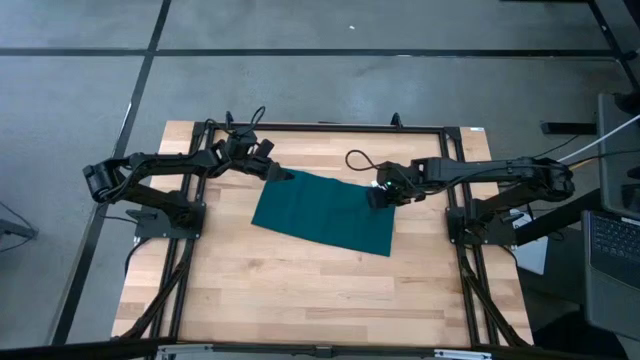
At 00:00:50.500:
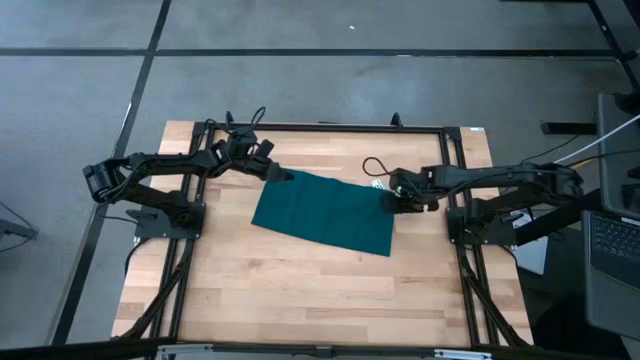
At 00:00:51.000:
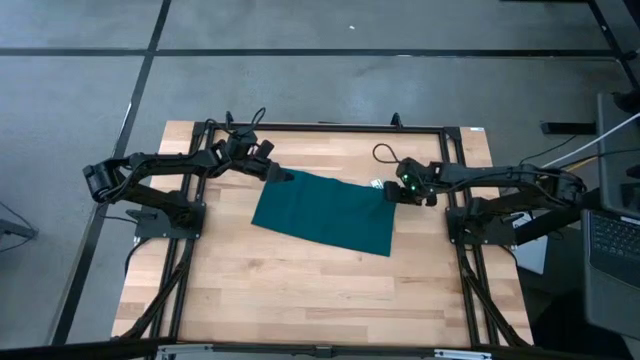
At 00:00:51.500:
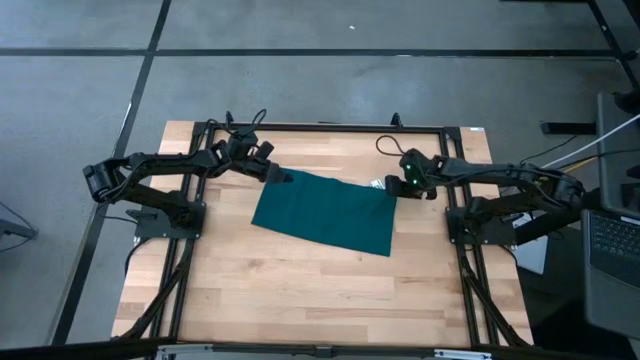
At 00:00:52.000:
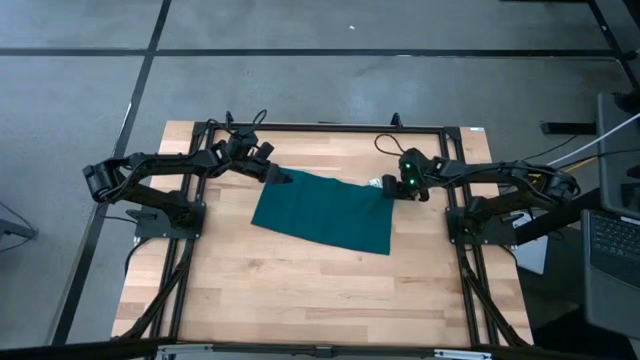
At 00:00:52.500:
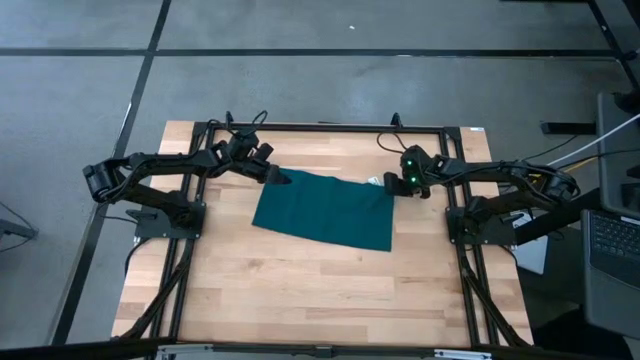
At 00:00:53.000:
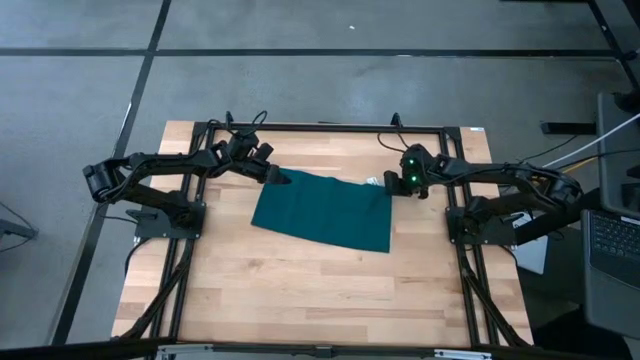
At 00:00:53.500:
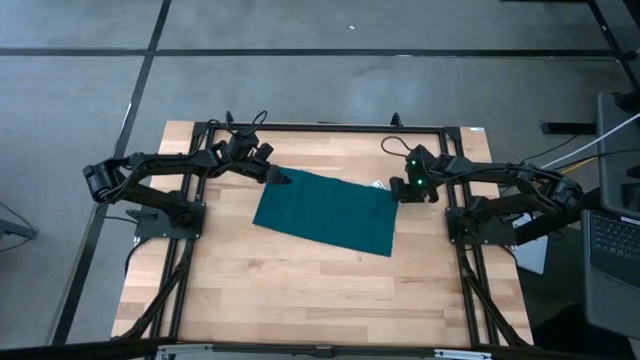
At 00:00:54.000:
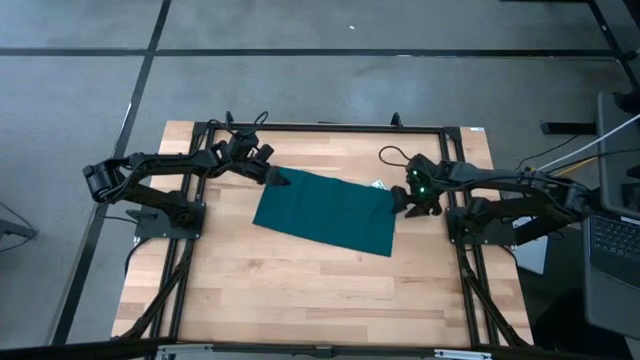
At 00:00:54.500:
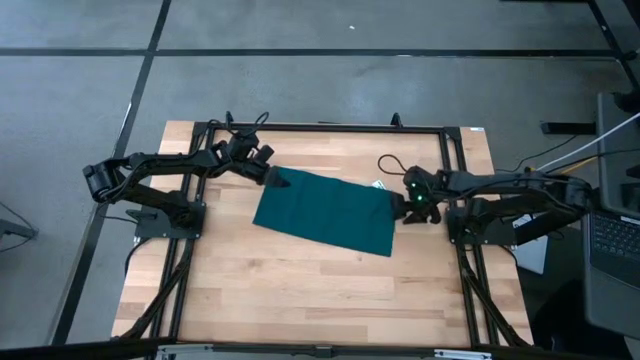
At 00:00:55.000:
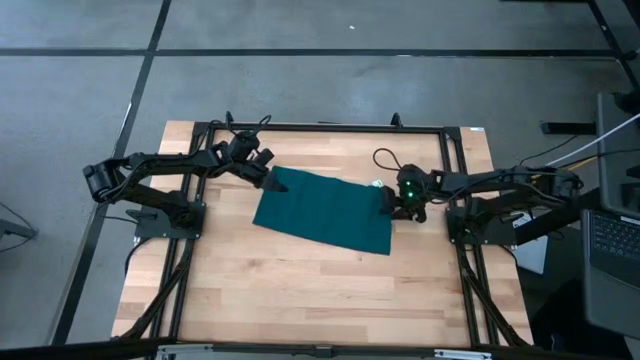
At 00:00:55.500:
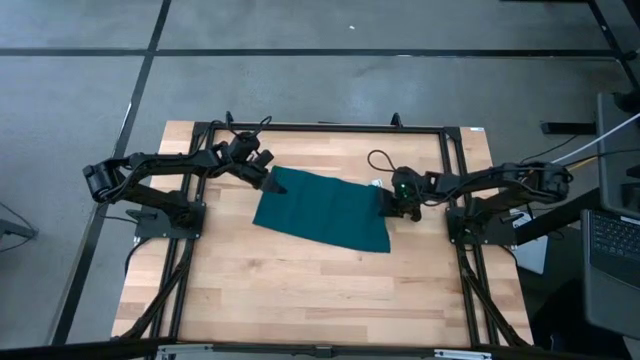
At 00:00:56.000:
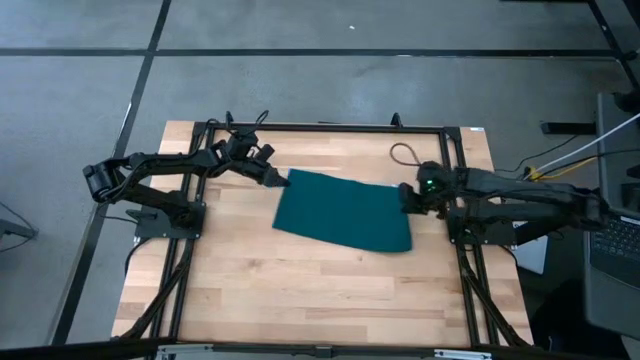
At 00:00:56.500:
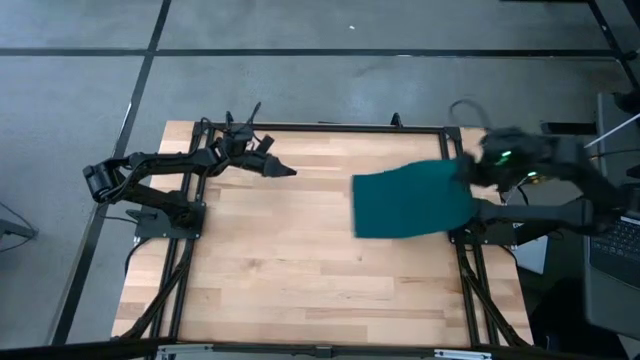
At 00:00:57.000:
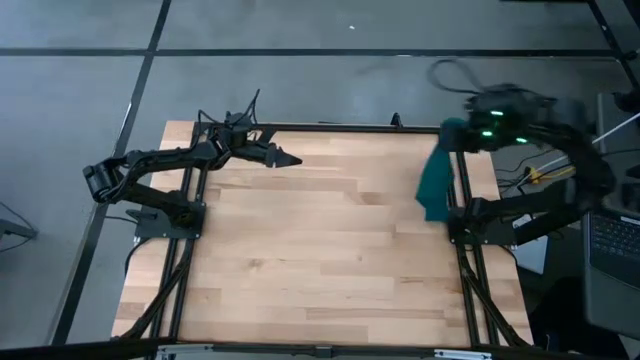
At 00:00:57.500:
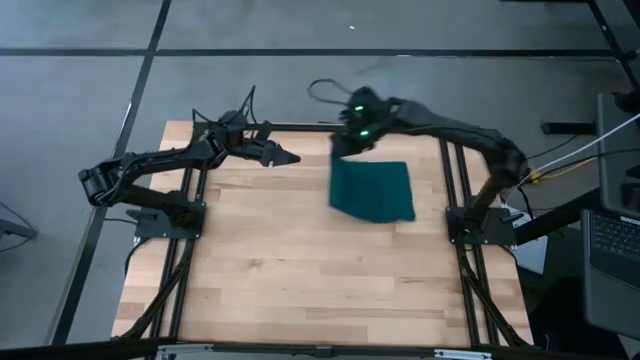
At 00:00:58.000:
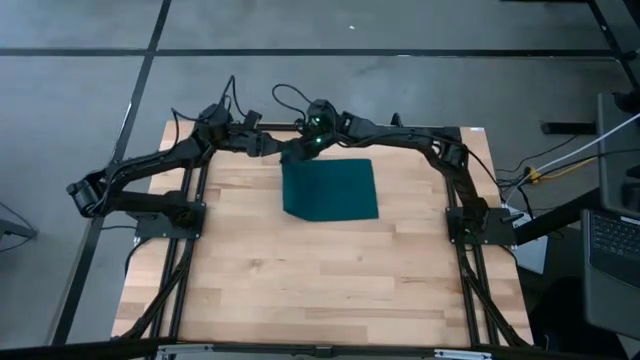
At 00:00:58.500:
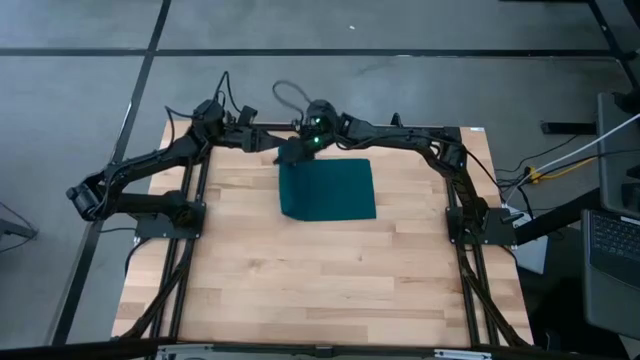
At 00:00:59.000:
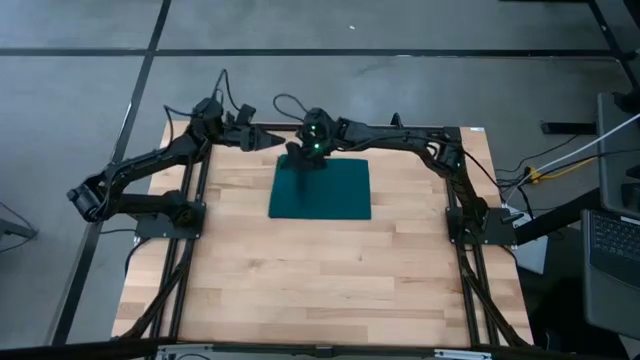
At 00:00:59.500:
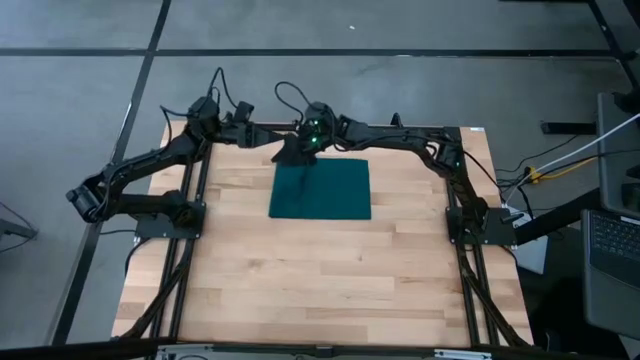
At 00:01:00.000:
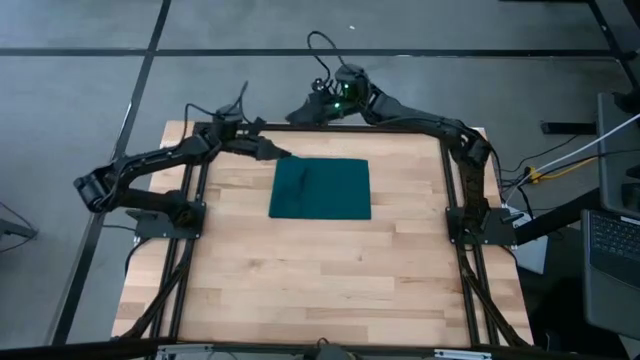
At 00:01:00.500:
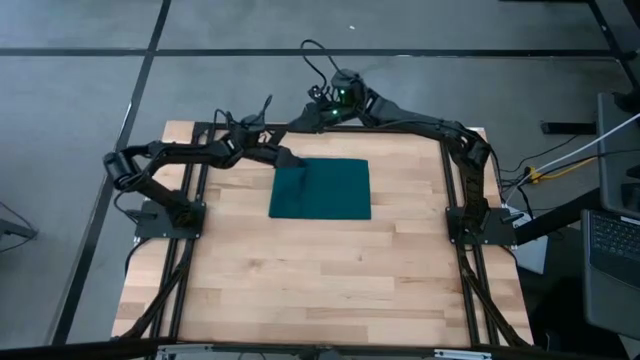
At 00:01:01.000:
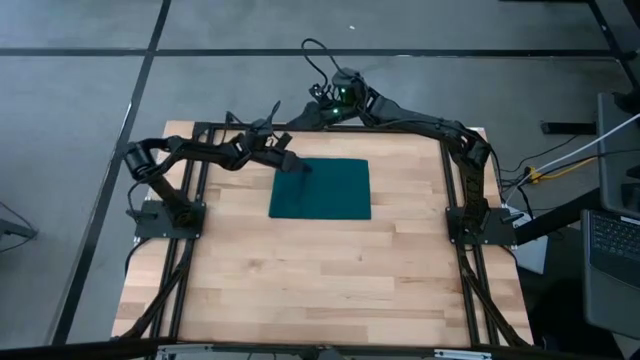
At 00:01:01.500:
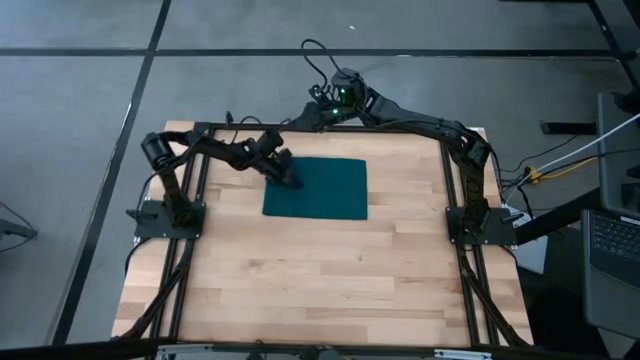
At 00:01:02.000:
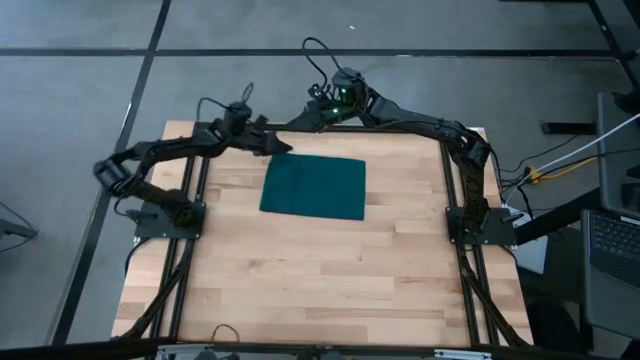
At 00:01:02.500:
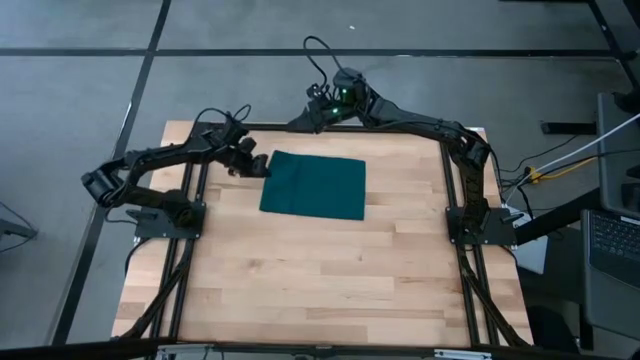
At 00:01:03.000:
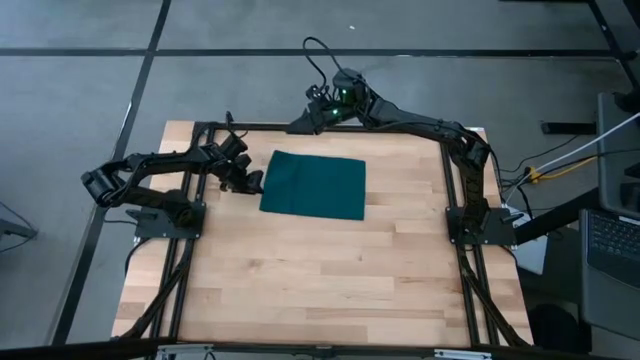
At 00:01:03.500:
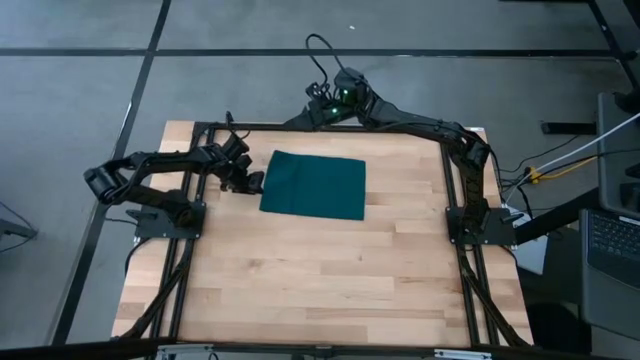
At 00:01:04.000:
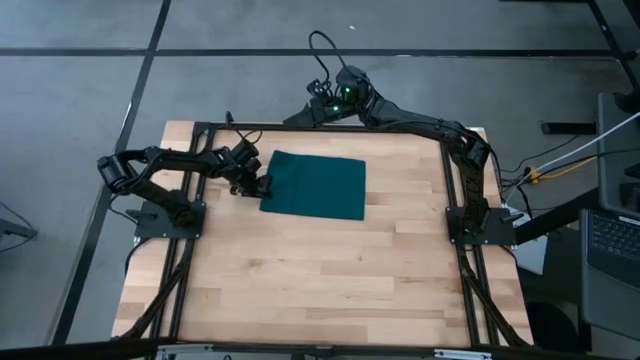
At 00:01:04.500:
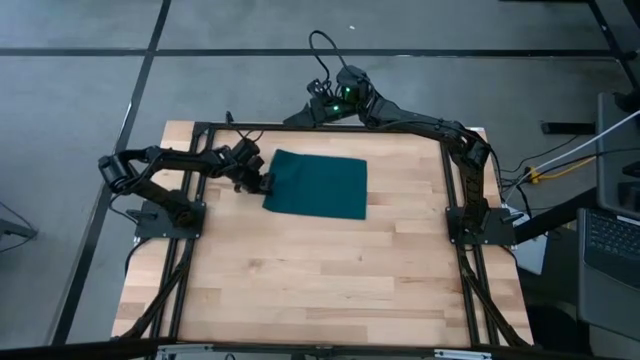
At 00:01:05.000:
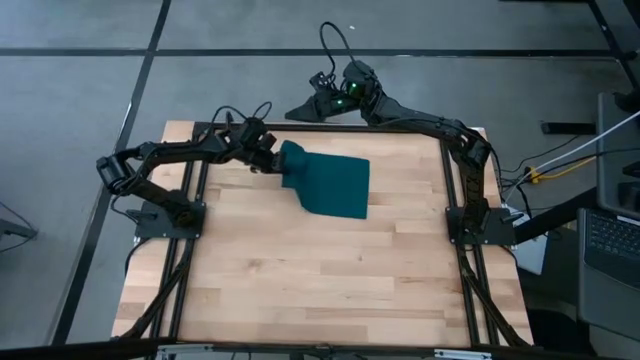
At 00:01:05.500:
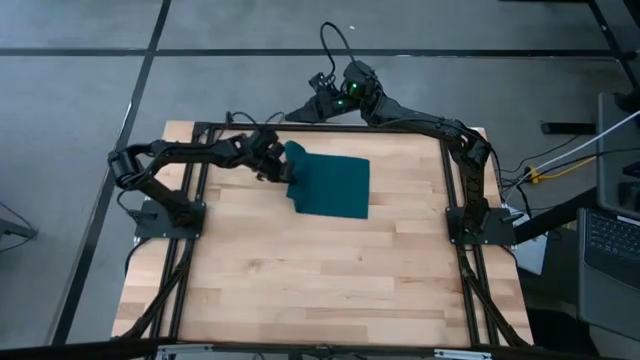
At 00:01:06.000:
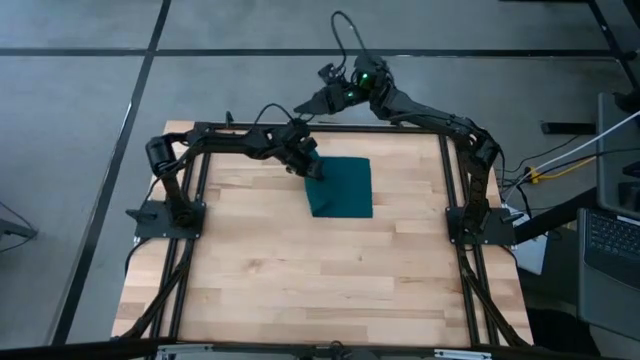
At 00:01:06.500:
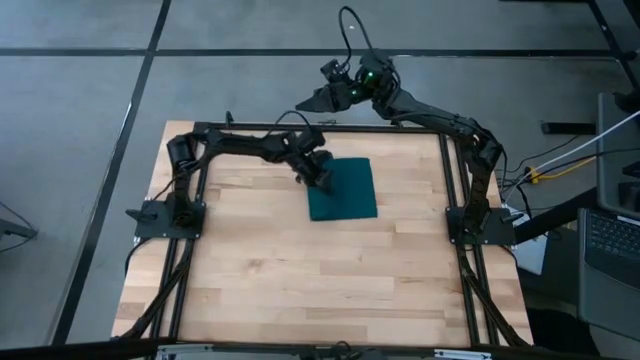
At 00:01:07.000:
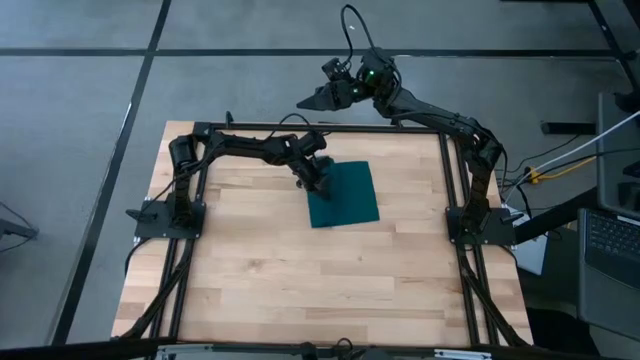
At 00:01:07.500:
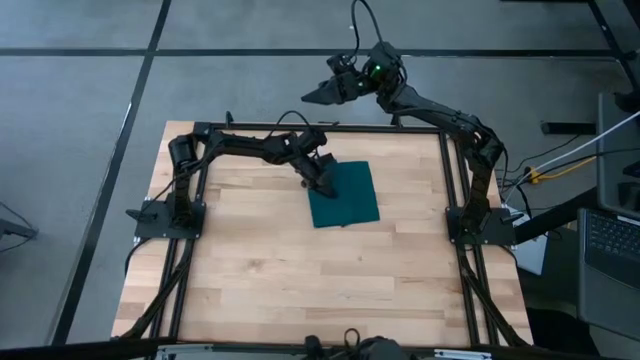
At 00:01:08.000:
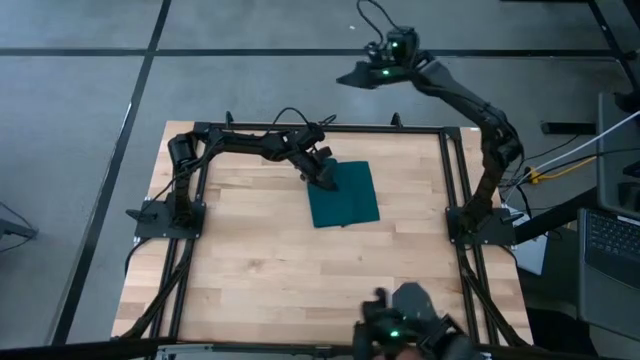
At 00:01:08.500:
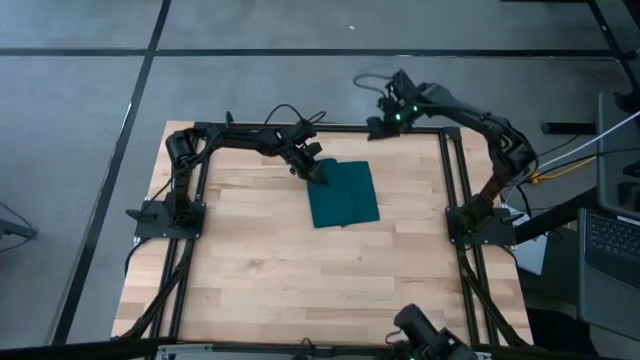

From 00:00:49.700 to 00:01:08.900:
Task: Fold microfiber towels
Fold the dark green napkin
